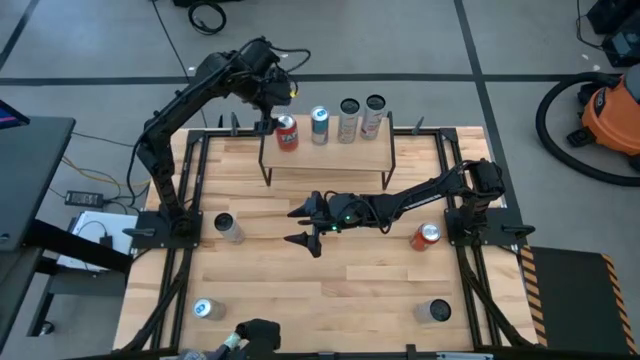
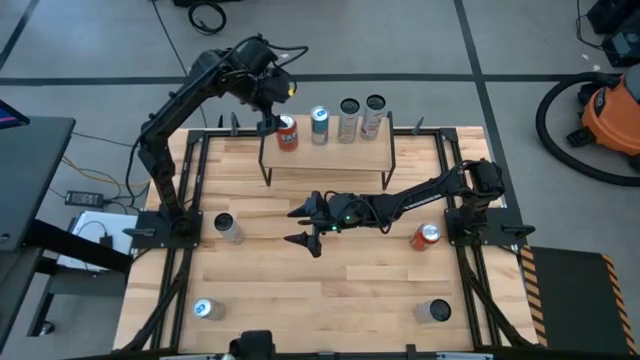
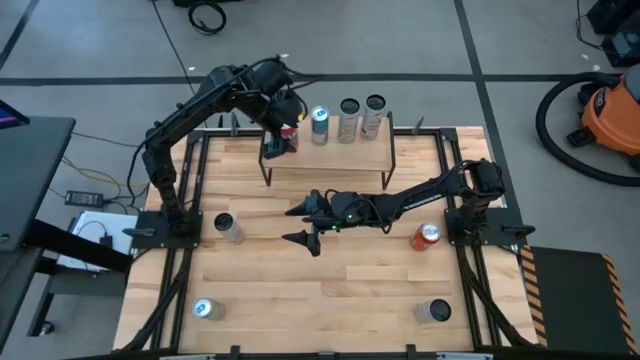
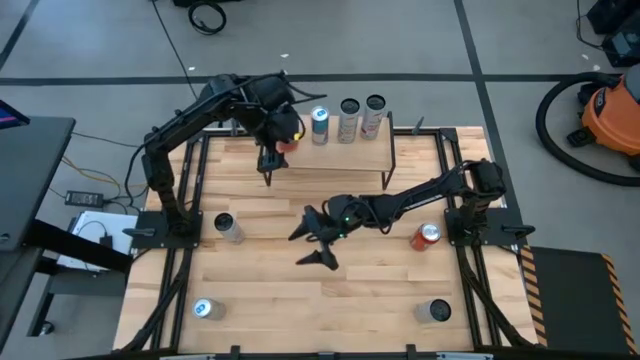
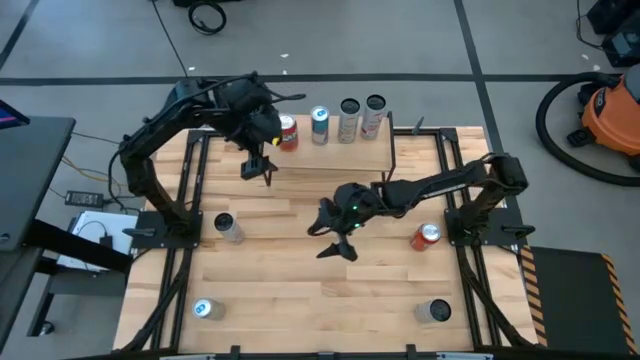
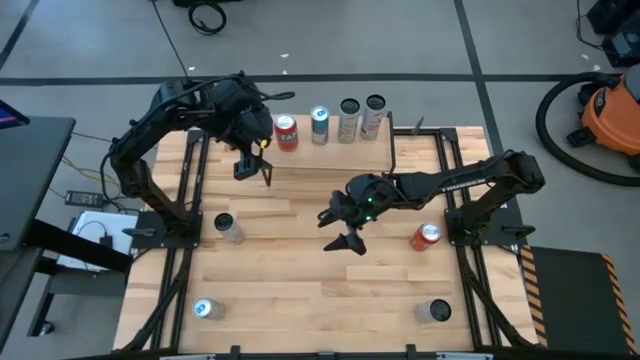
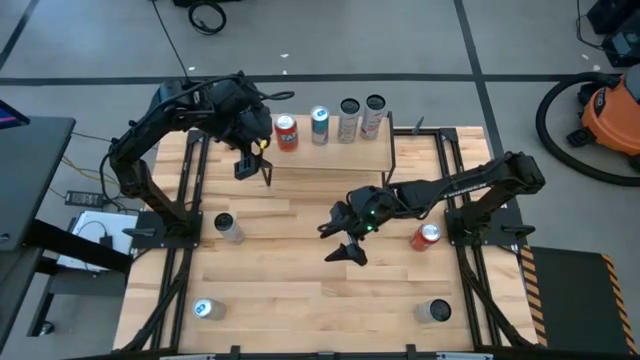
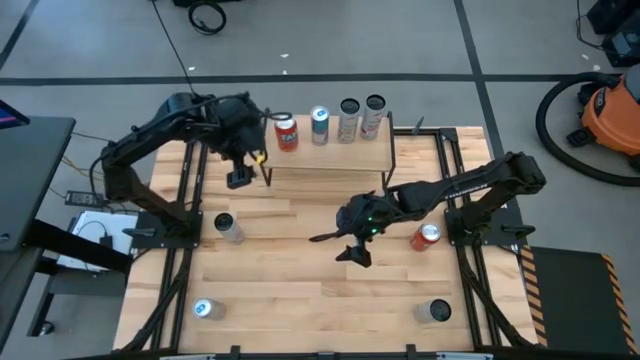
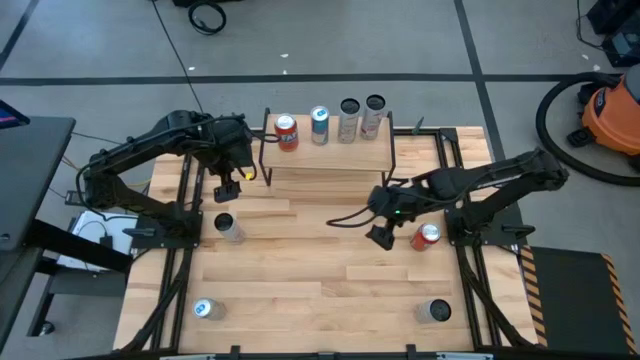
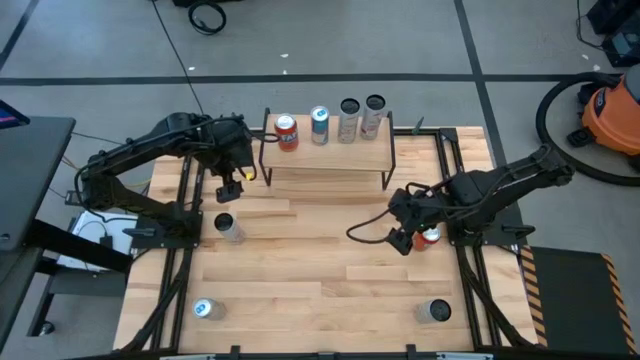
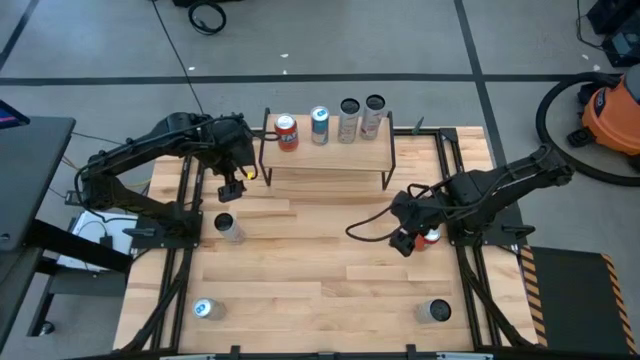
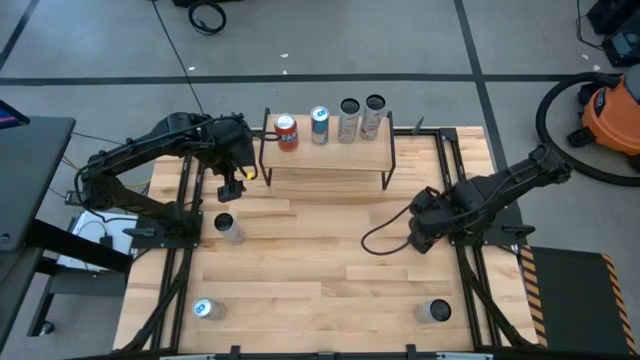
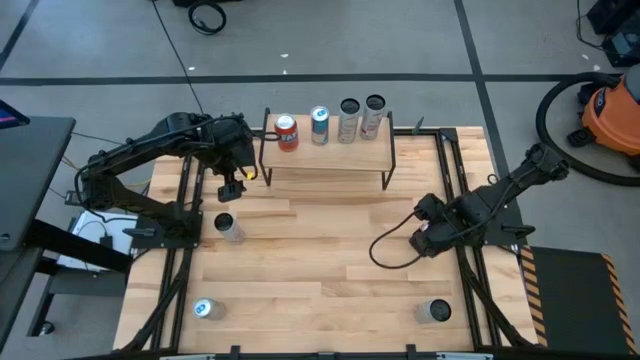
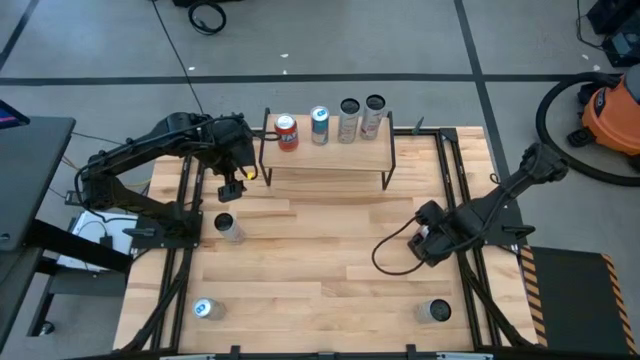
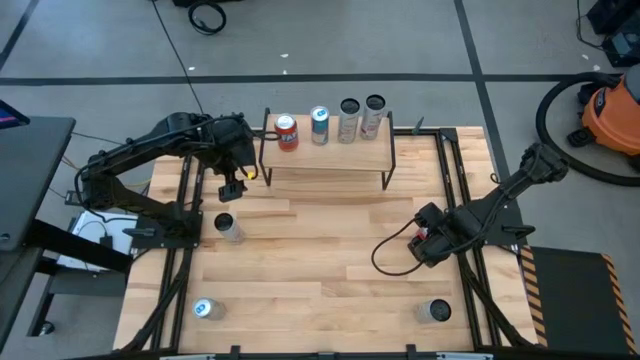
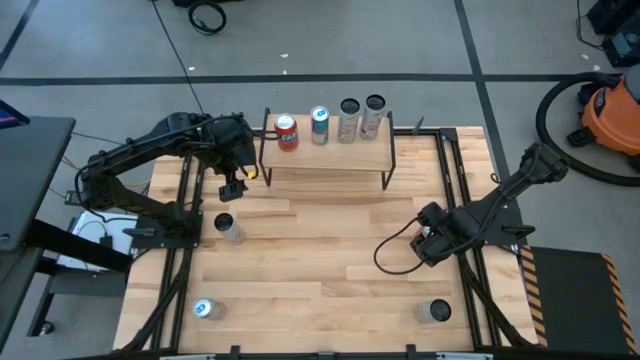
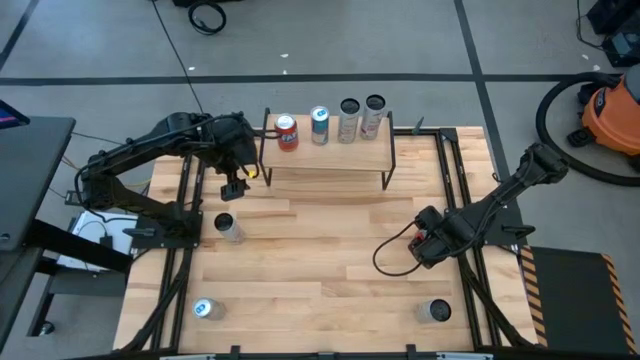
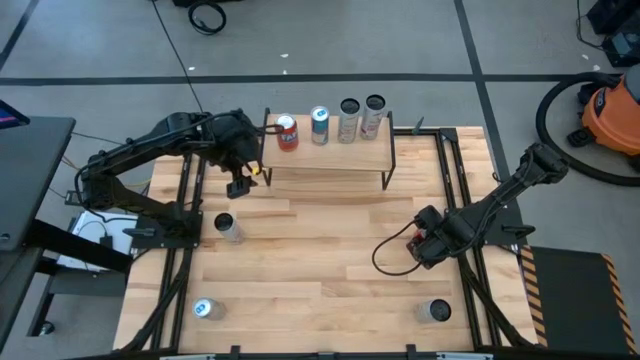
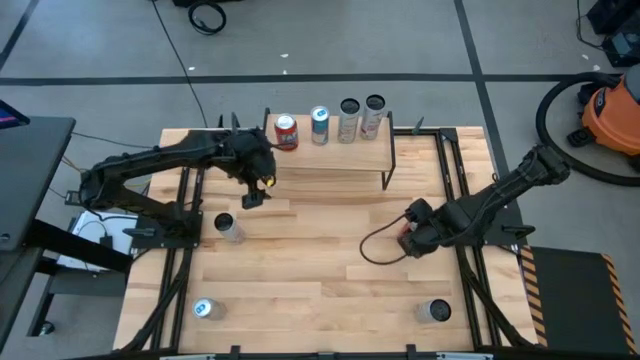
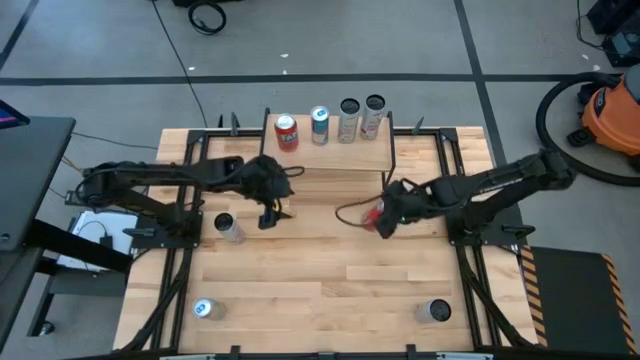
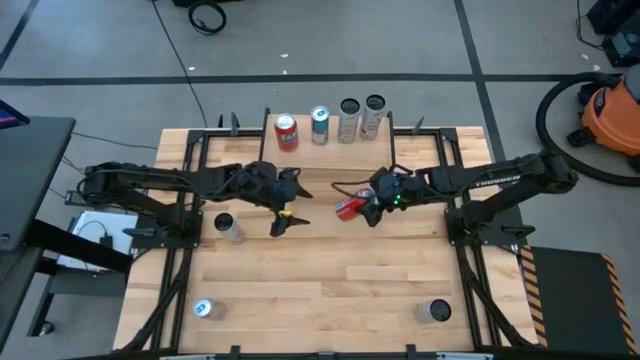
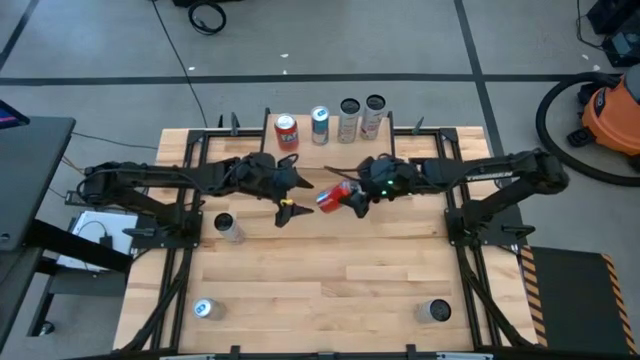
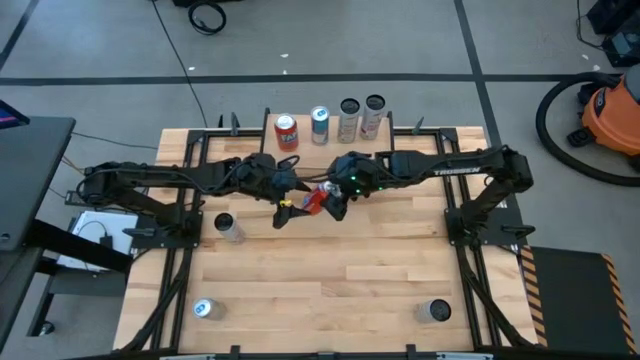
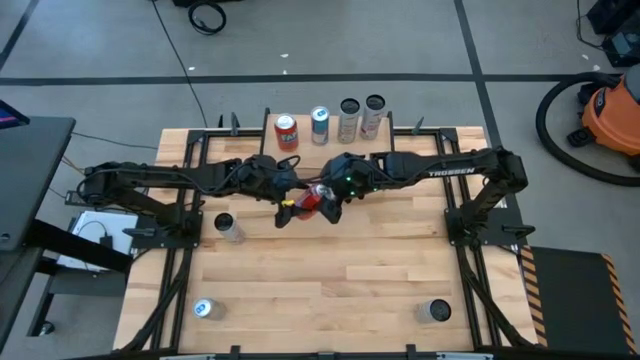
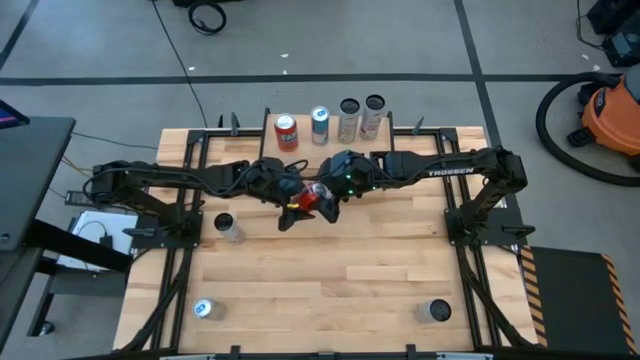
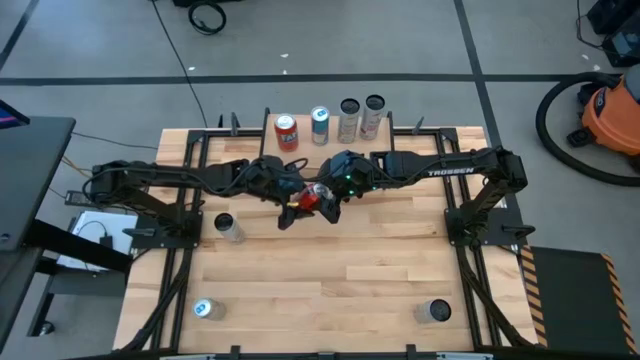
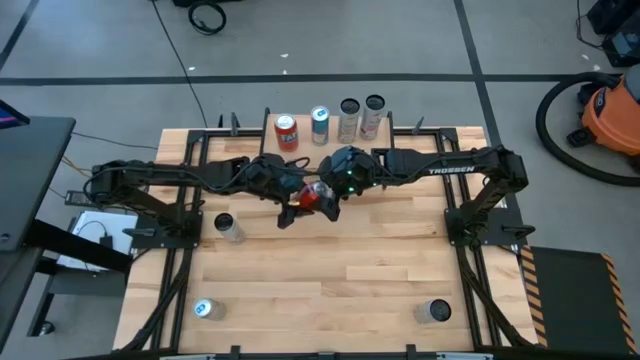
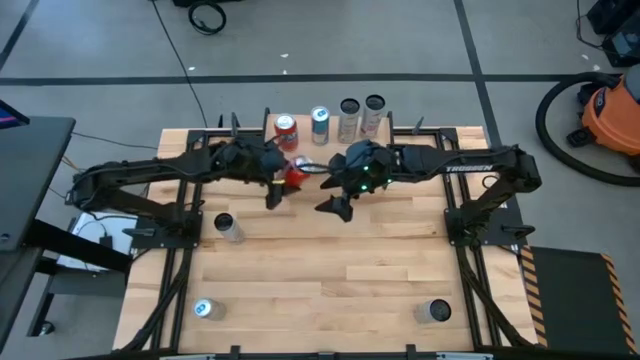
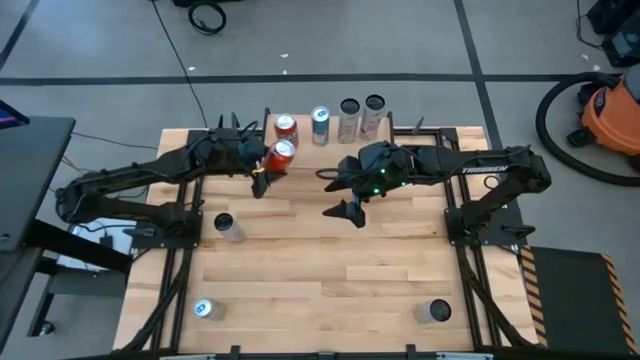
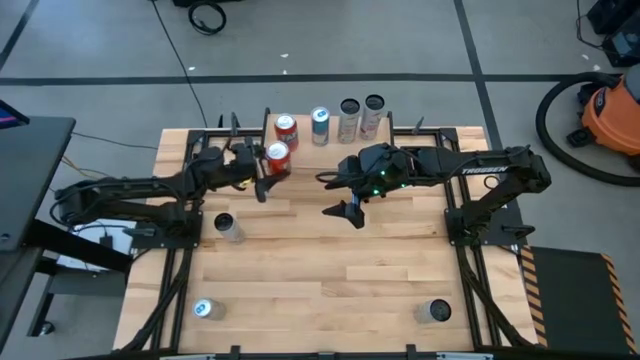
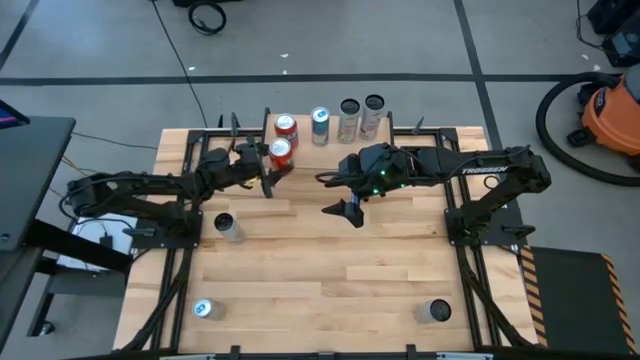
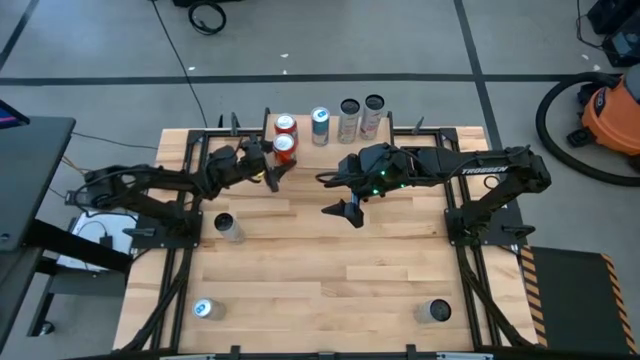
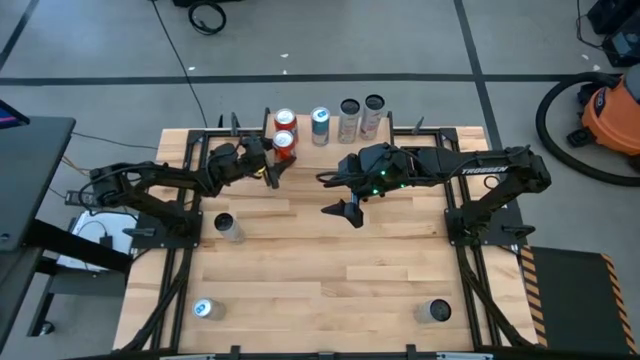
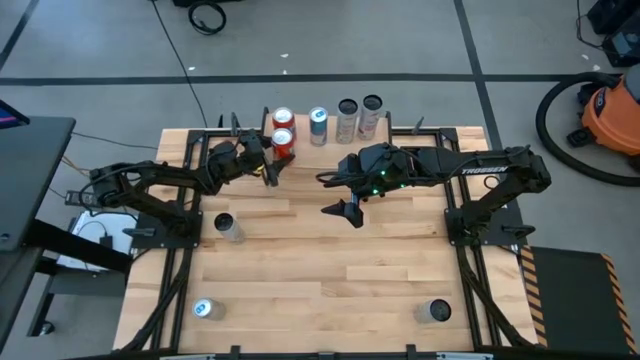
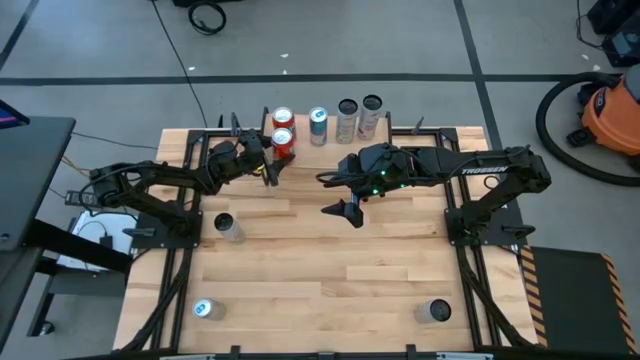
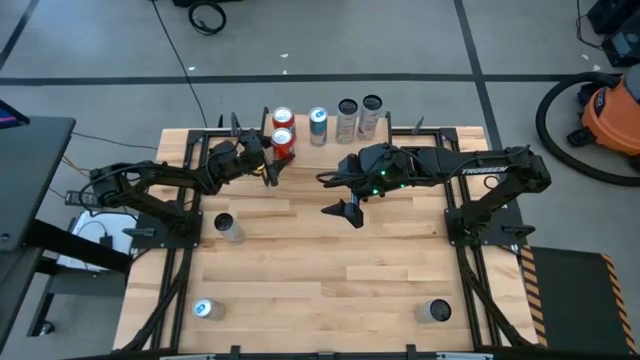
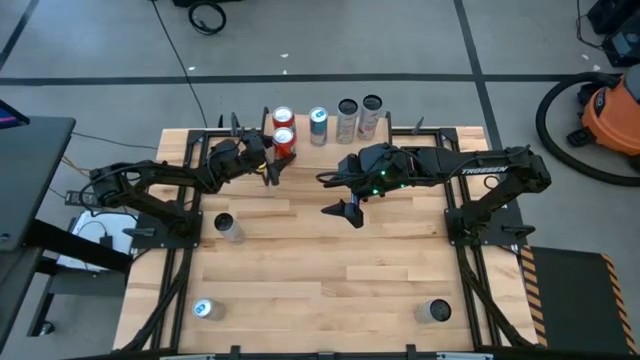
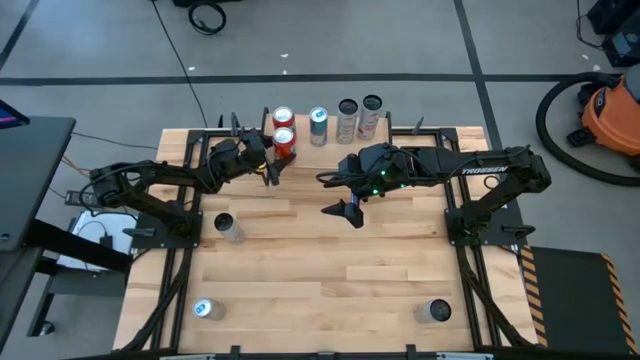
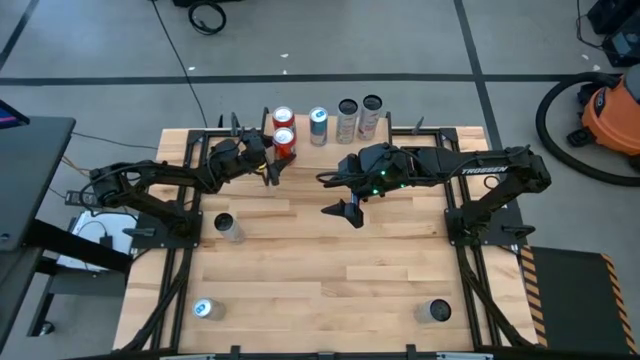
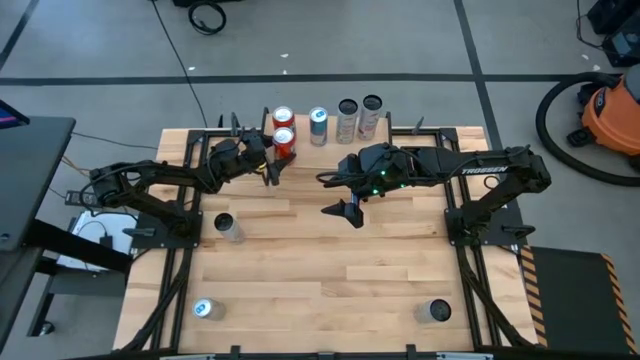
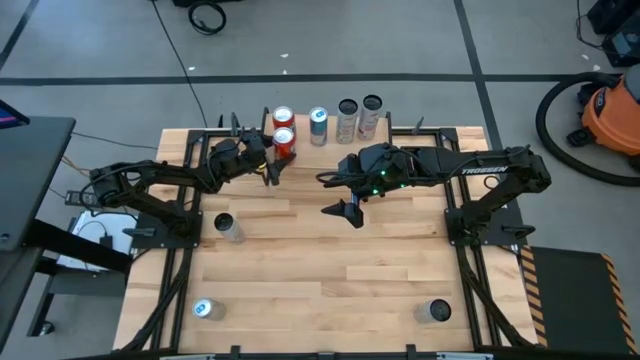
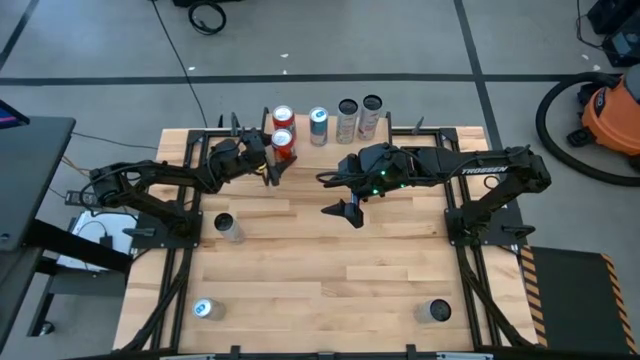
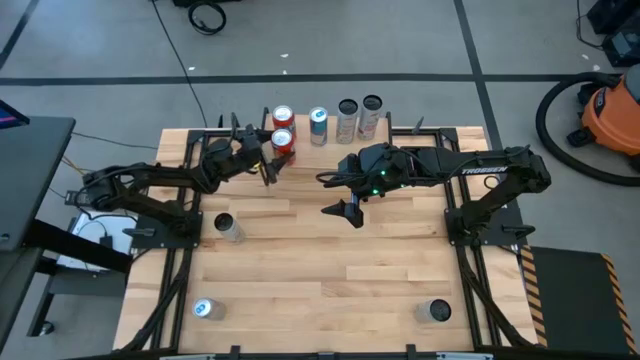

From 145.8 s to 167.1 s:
Task: Place canned beverage on shelf
Put the left red soda can on the shelf
